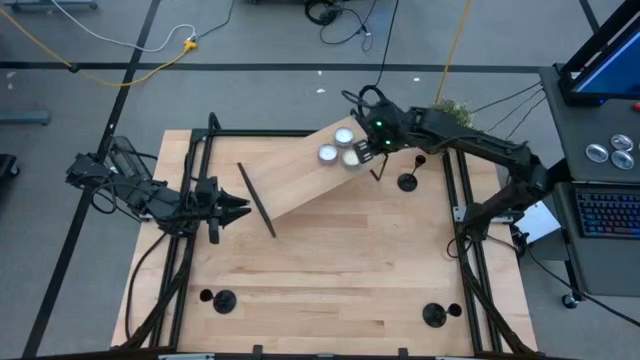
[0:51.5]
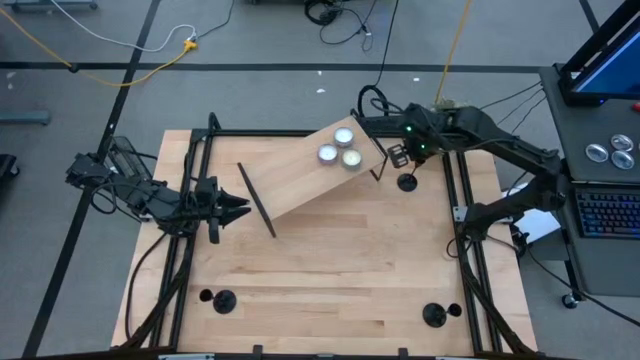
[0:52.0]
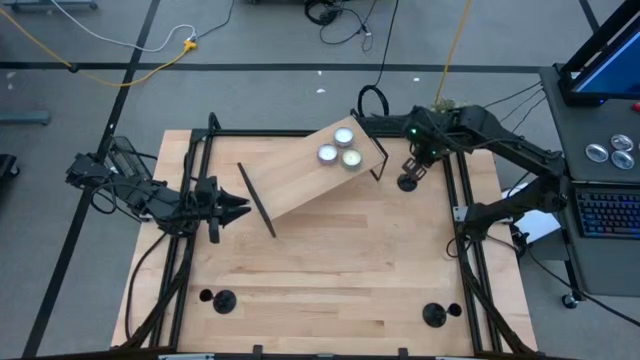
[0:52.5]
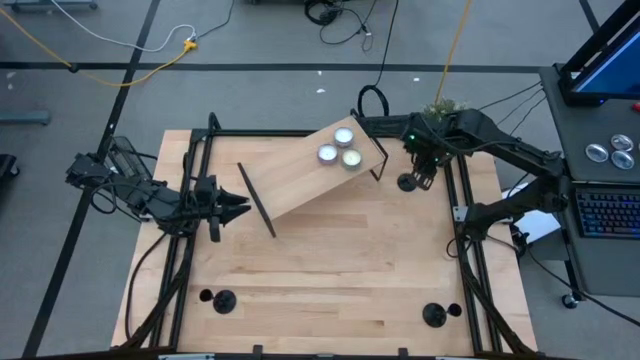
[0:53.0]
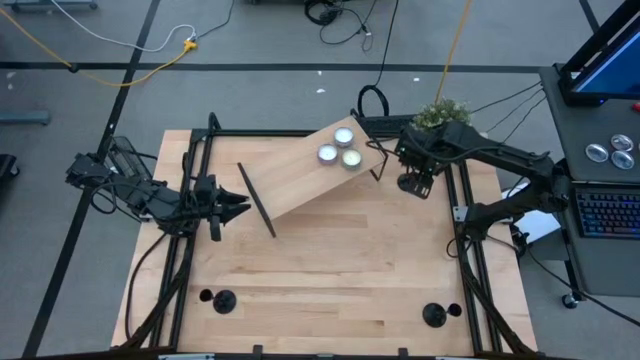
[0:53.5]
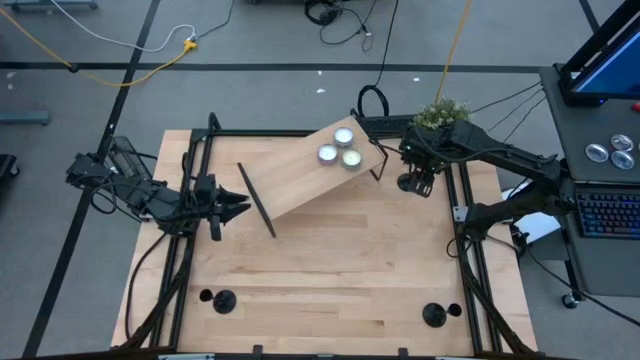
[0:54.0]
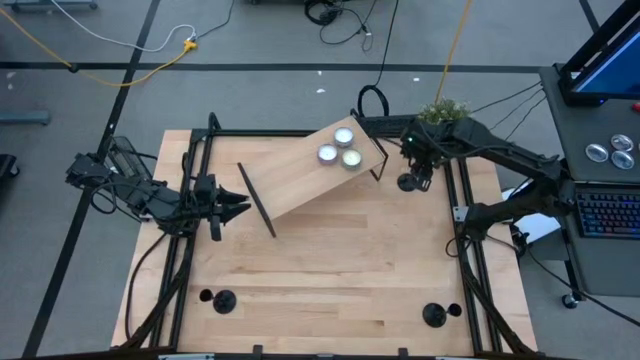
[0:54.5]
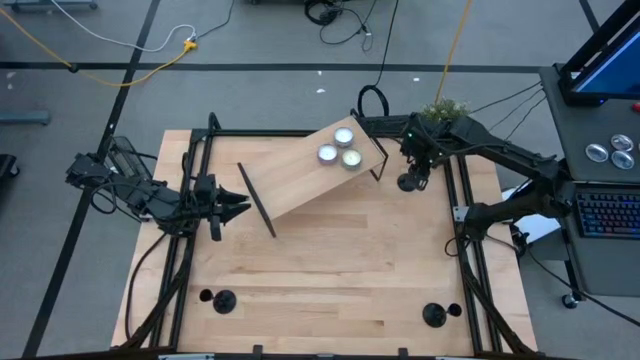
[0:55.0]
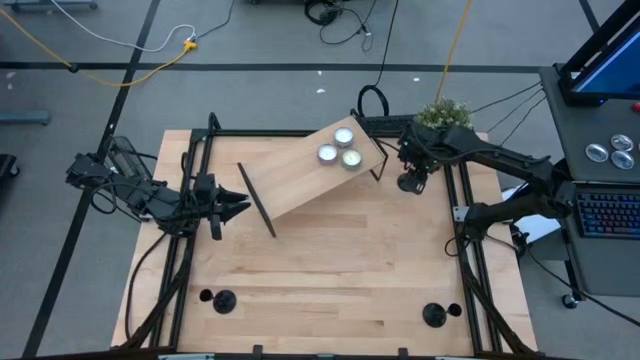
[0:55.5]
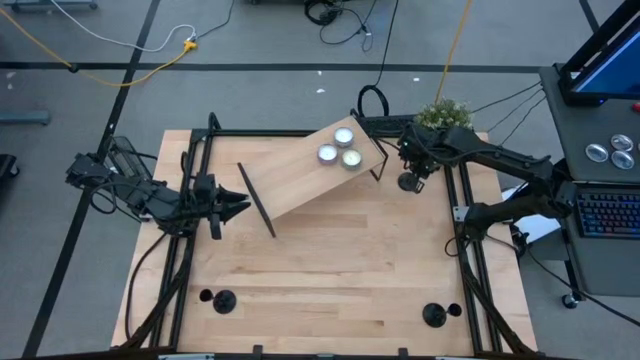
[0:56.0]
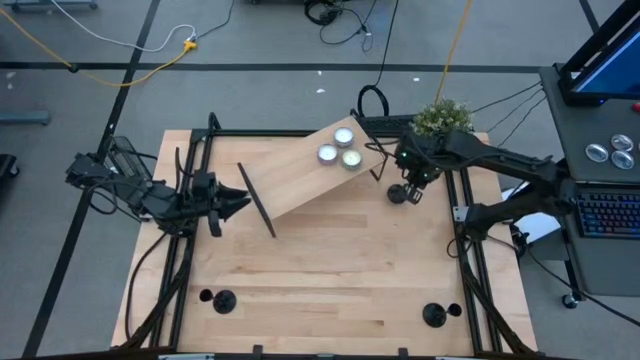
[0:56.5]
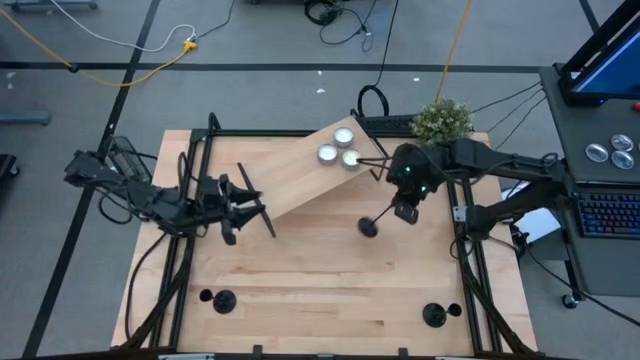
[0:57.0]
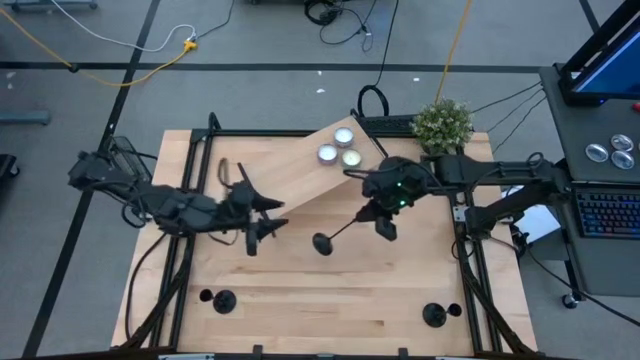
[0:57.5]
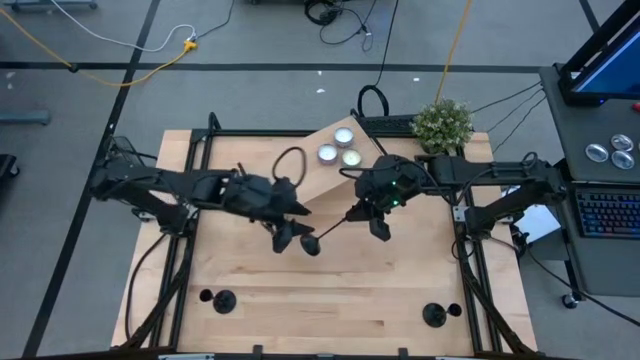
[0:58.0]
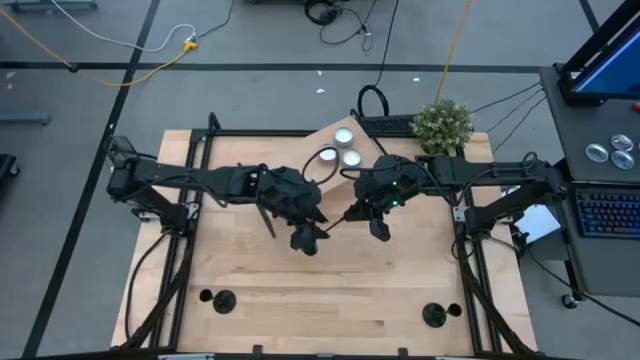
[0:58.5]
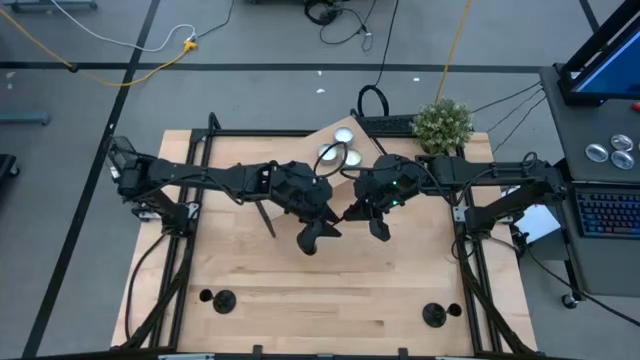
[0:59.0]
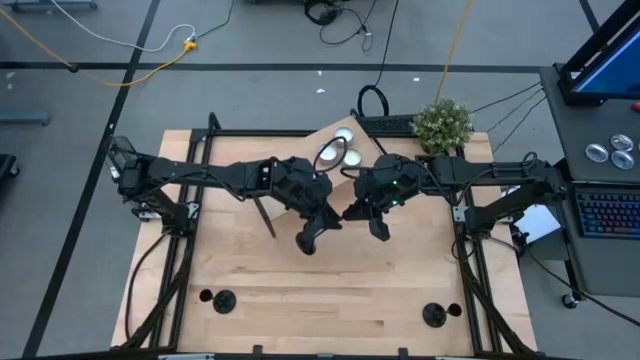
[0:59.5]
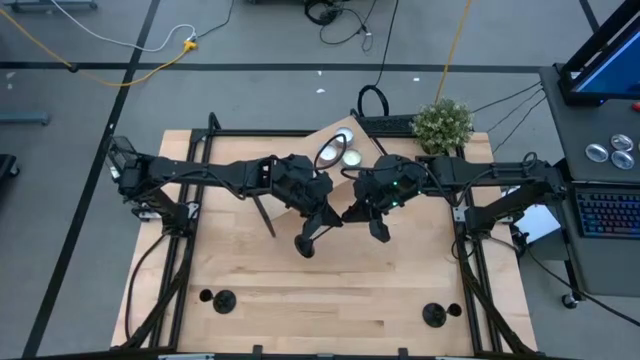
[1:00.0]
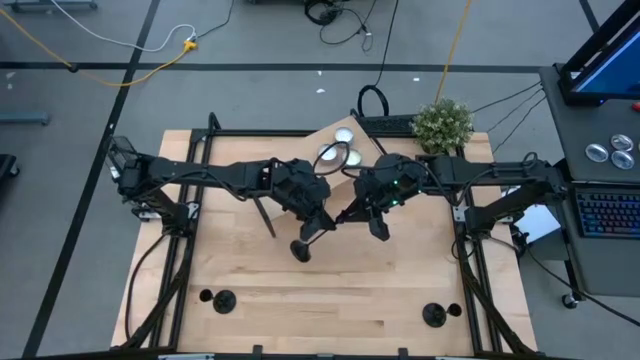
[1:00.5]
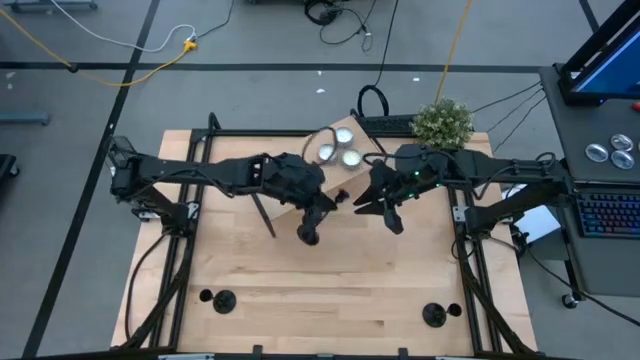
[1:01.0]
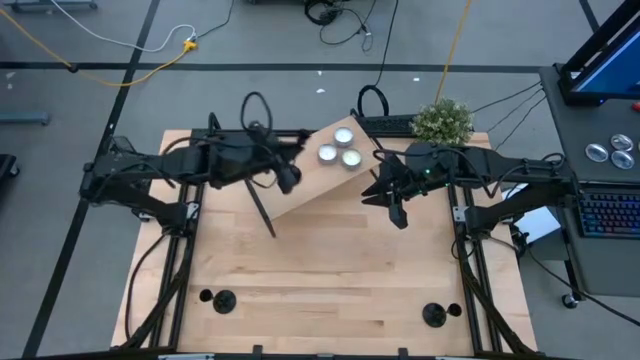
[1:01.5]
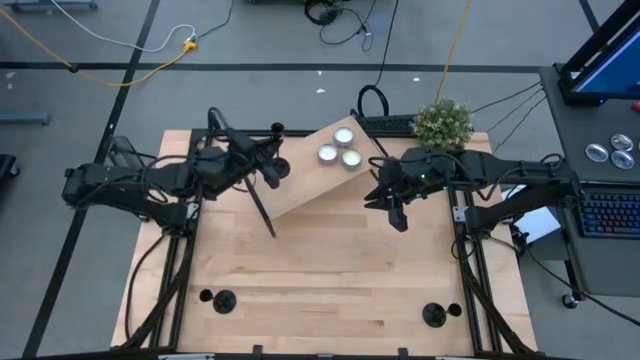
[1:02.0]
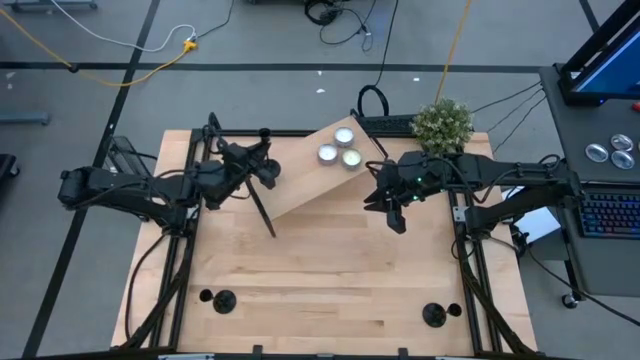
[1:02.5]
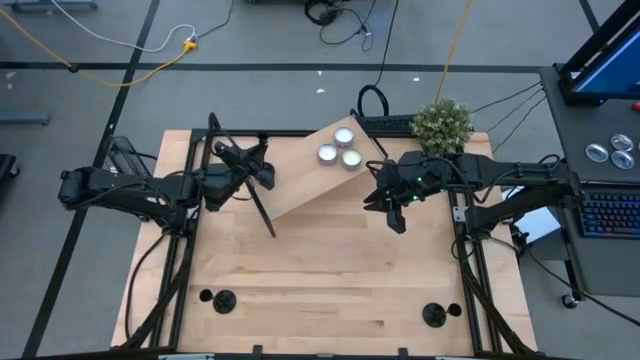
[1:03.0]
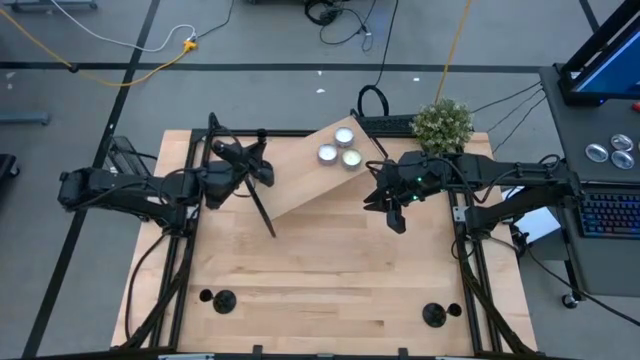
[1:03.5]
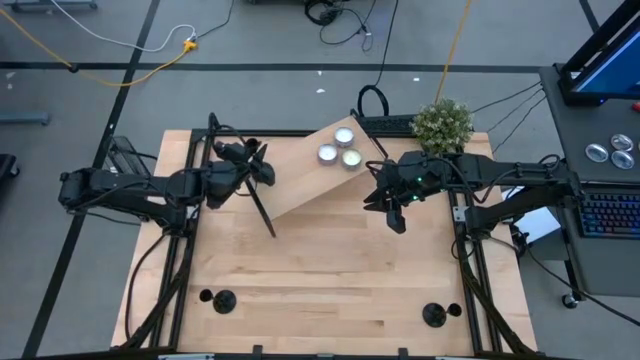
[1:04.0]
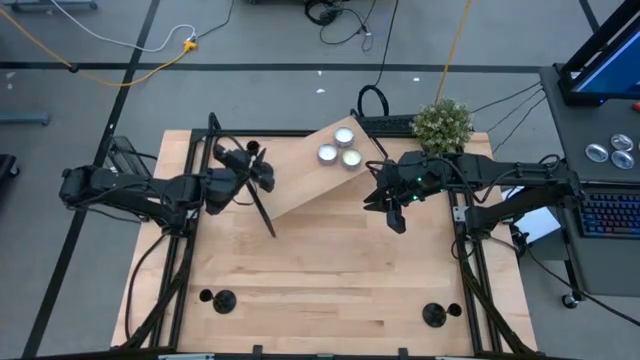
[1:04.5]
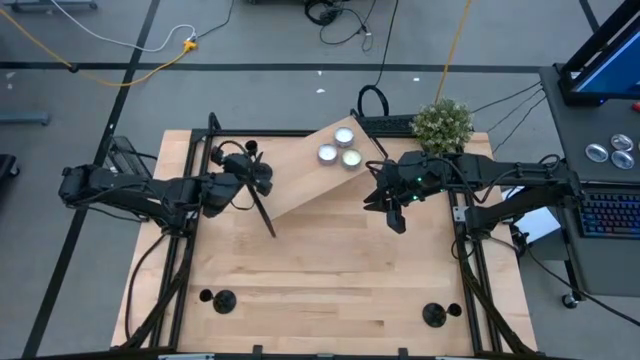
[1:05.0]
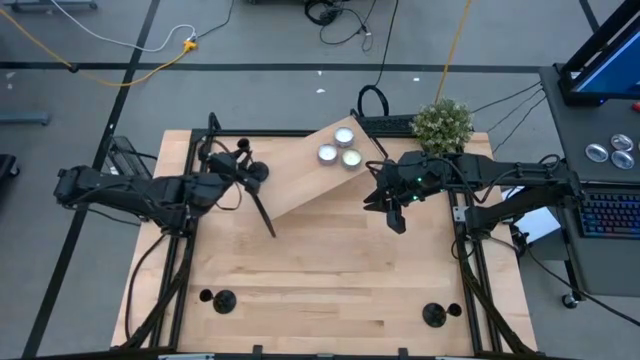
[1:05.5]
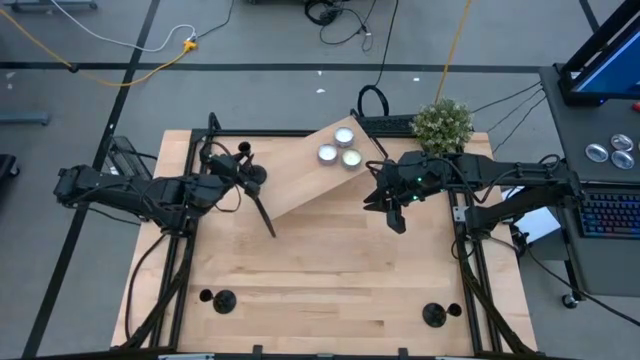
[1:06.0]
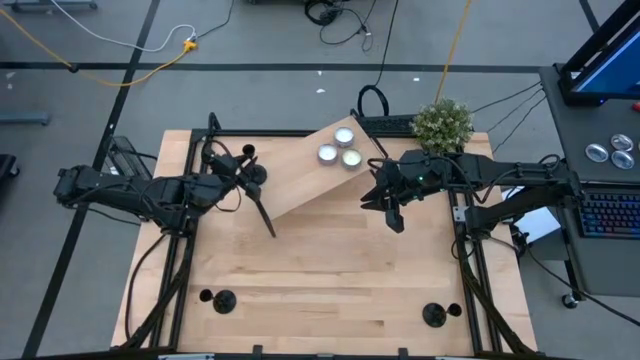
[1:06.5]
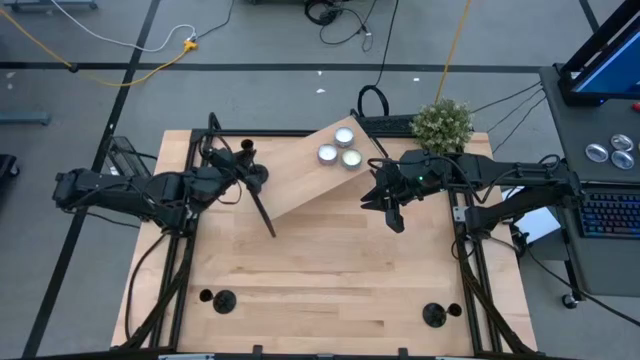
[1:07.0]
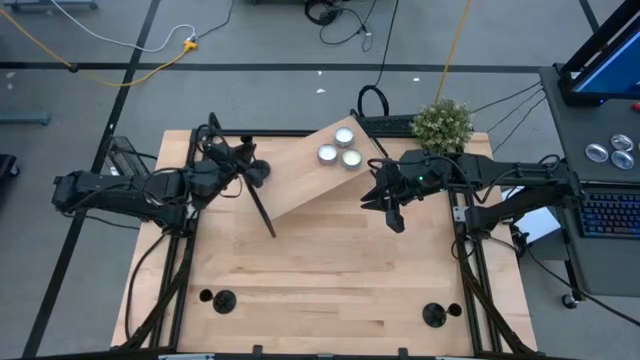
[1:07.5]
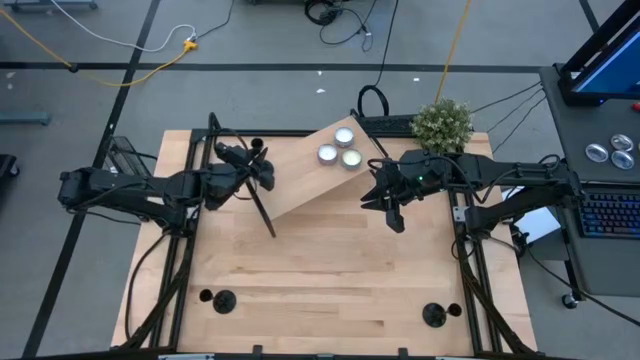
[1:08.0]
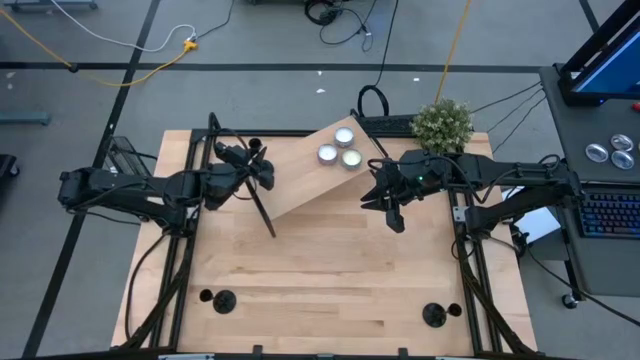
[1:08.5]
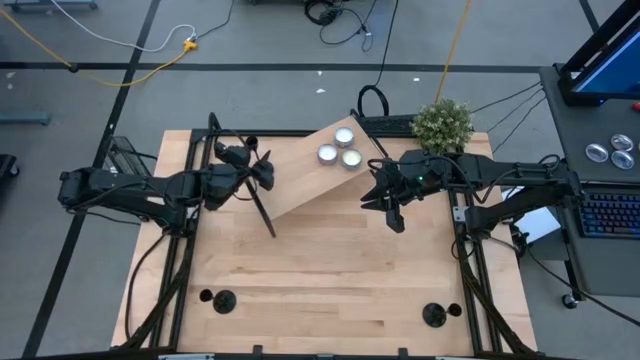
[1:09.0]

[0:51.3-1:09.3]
Task: Pick & Place candle stick holders
Put the top black candle holder on the shelf
